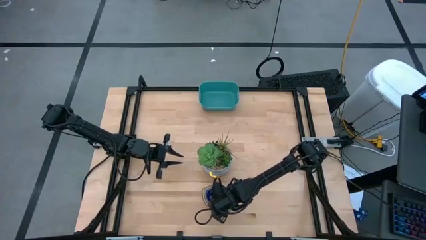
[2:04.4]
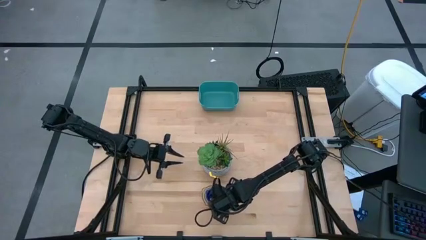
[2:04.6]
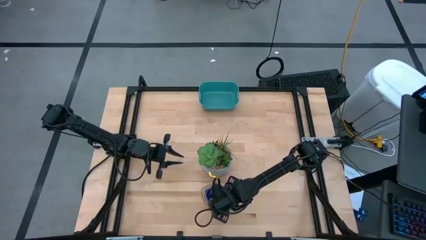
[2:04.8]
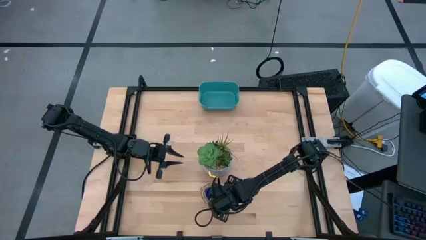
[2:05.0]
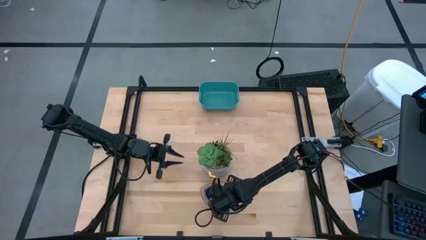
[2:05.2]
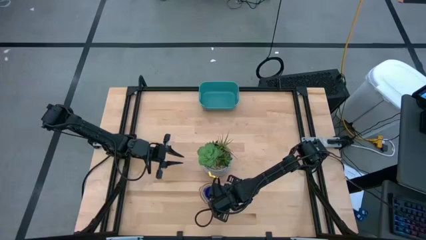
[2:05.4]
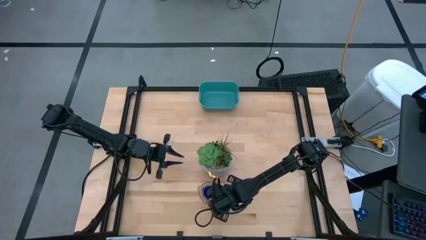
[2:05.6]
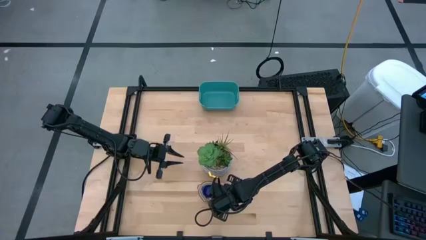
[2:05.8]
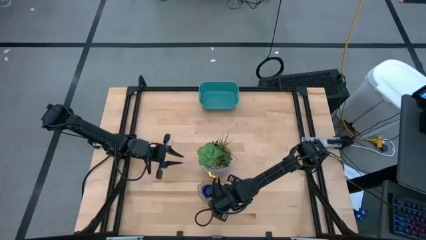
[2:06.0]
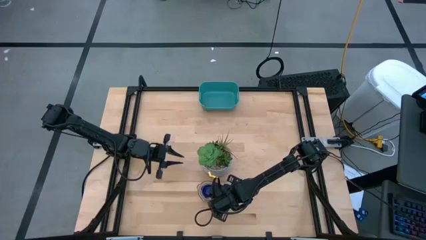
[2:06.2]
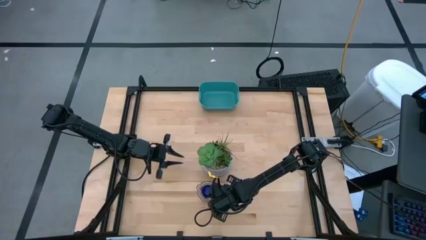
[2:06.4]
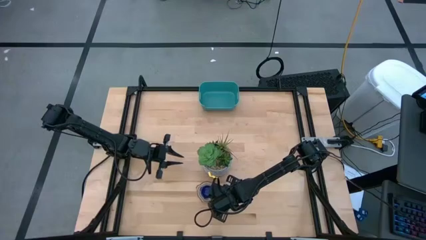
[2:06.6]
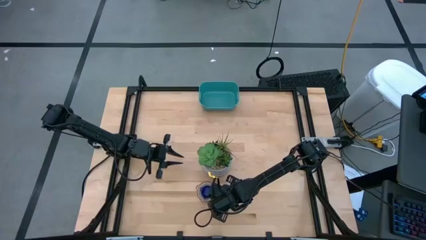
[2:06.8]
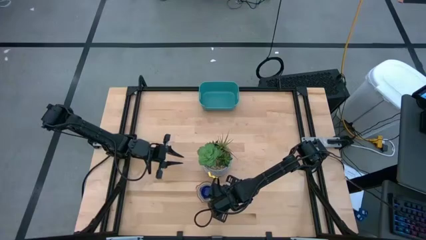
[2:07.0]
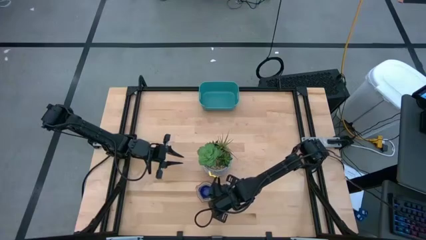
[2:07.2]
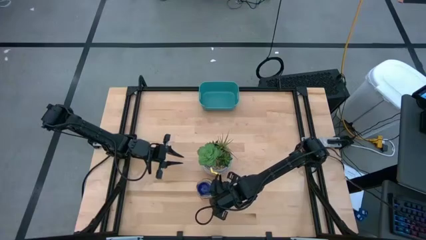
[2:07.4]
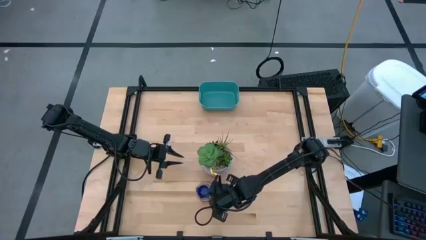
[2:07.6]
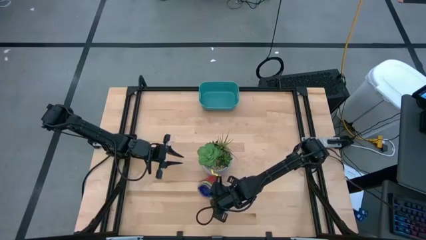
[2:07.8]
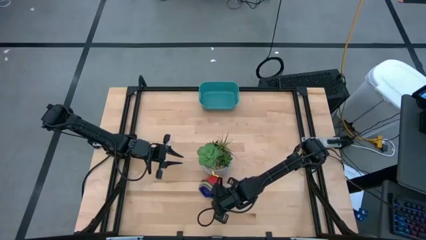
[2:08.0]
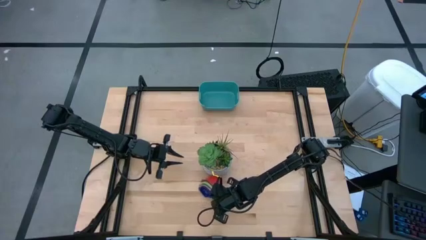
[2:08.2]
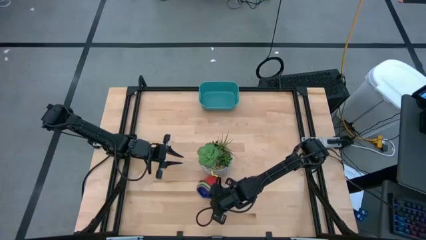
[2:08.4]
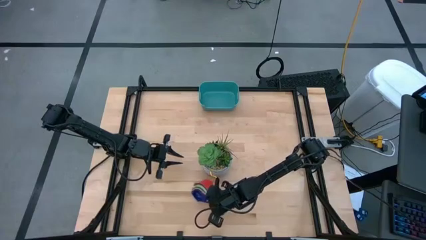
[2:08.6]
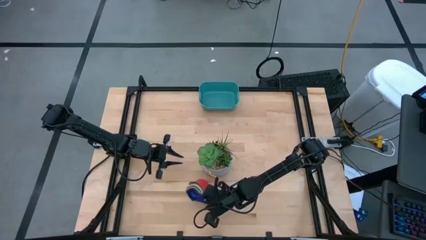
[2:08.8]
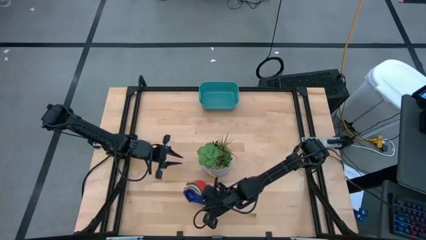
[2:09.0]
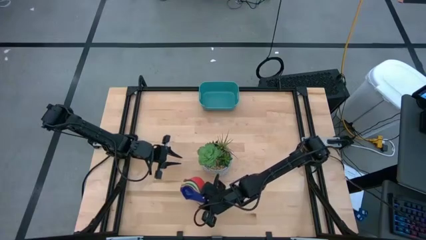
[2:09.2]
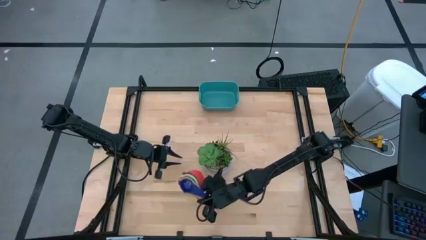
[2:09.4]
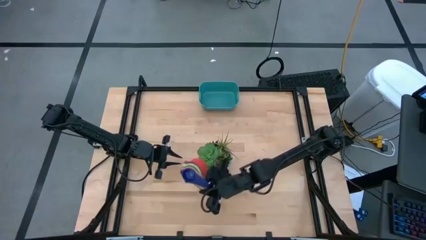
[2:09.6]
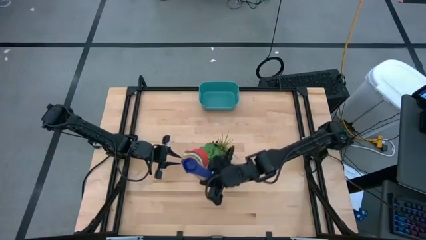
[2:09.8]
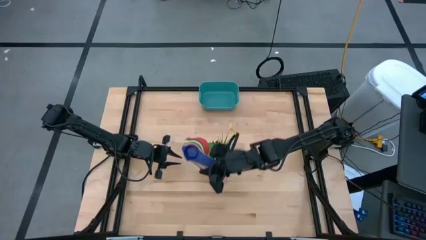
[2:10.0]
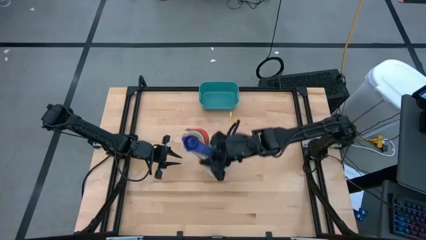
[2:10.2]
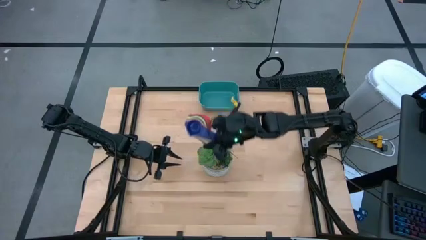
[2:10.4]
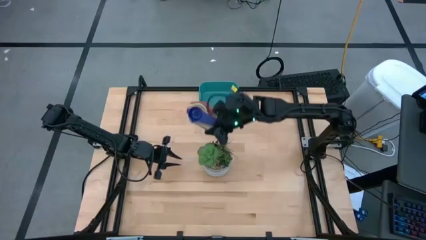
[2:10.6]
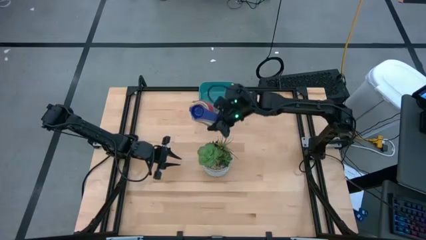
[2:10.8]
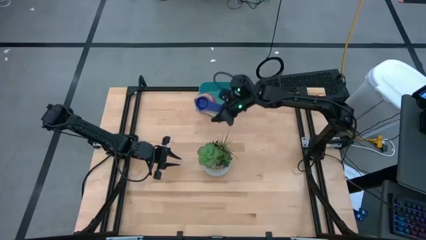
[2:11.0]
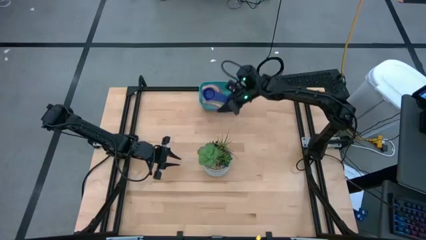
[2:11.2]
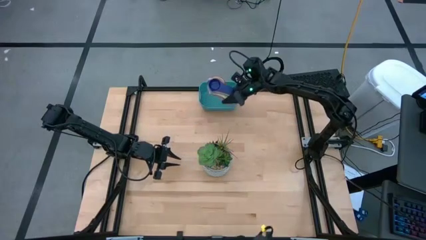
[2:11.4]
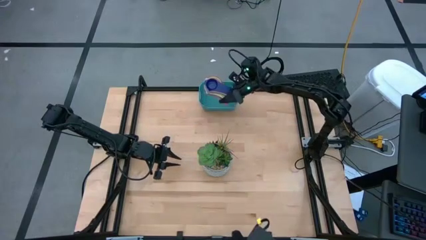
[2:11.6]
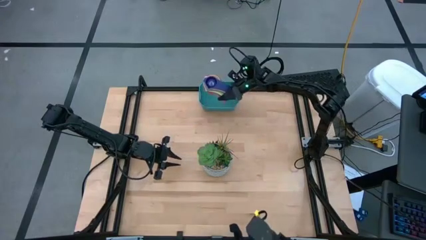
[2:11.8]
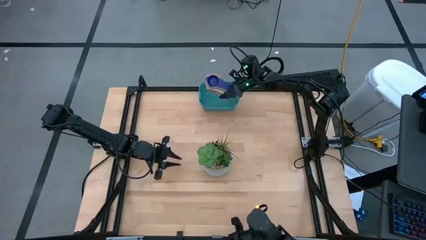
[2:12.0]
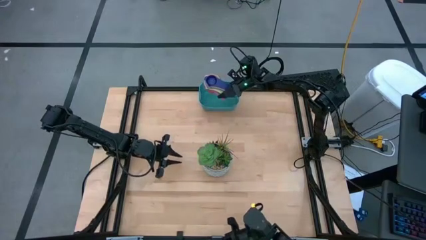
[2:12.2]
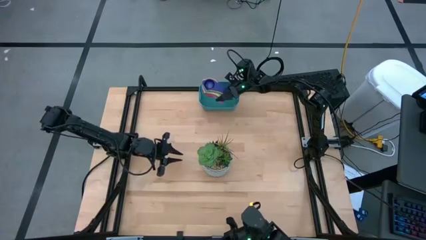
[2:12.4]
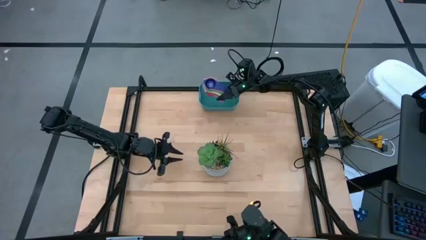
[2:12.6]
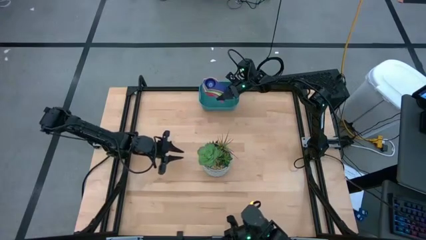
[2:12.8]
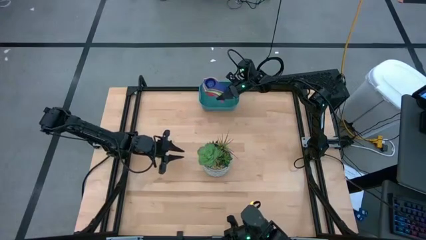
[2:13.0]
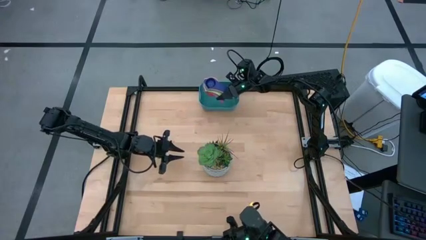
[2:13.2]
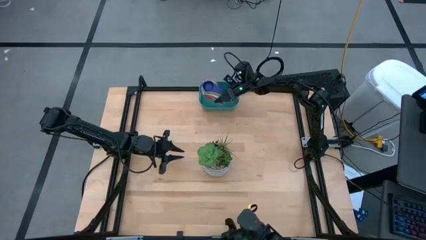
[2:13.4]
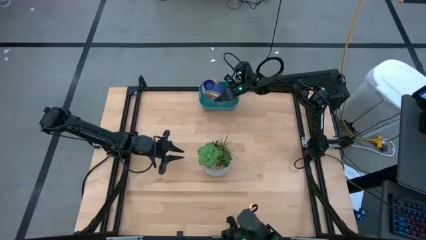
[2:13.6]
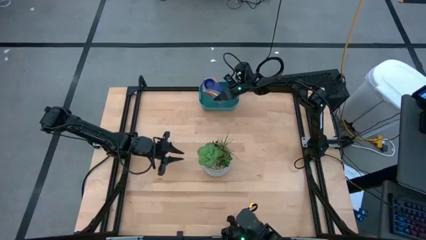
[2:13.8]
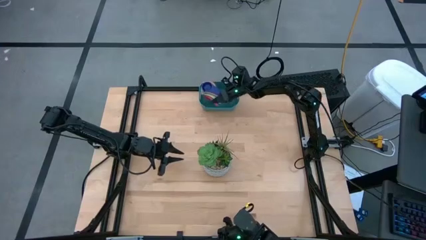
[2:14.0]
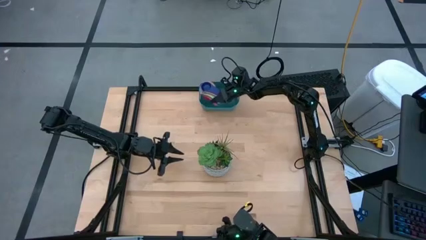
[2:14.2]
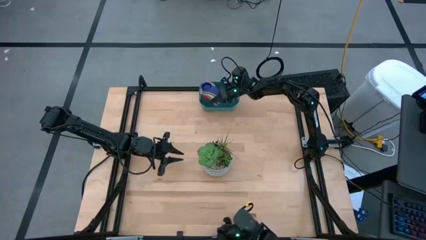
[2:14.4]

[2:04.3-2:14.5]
Task: Nest measuring cups in basket
Put the nested measuring cup into the green bin

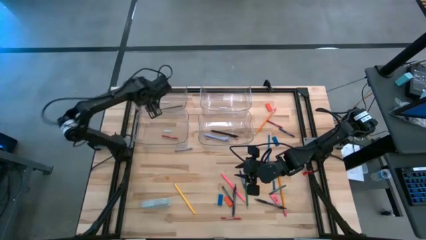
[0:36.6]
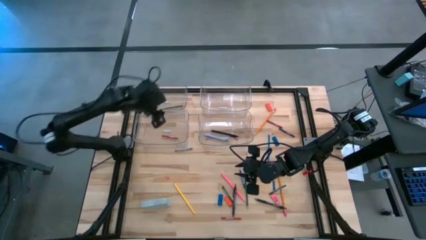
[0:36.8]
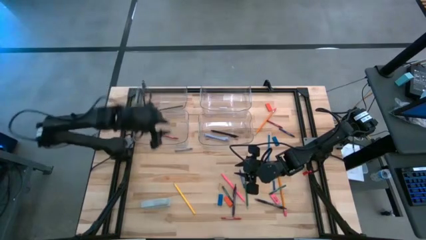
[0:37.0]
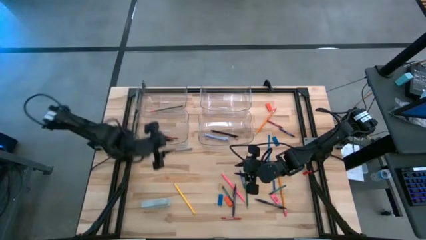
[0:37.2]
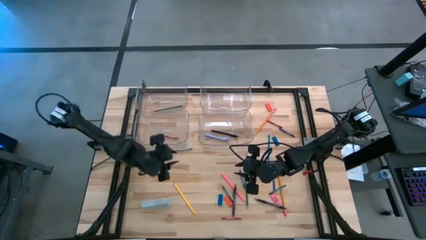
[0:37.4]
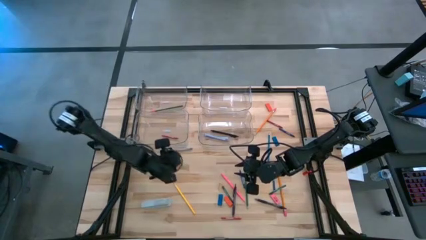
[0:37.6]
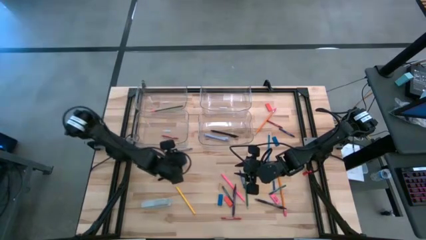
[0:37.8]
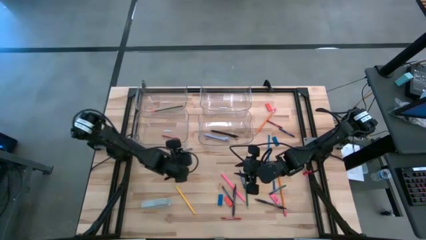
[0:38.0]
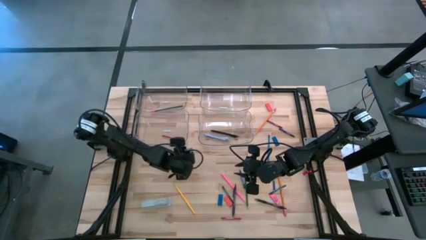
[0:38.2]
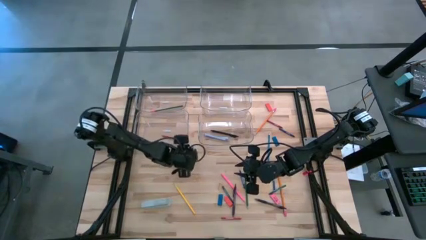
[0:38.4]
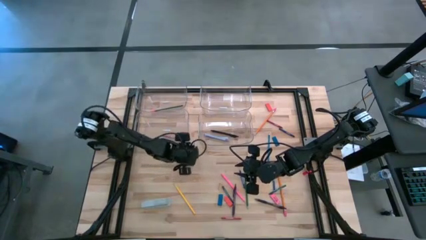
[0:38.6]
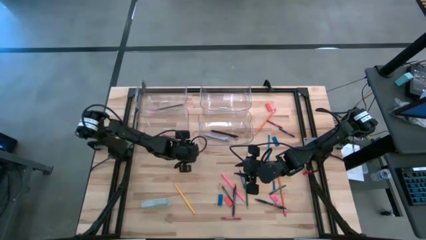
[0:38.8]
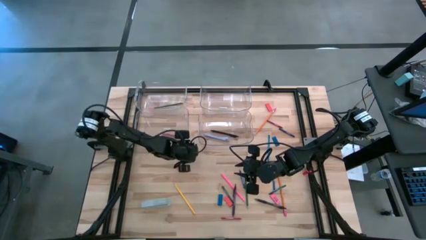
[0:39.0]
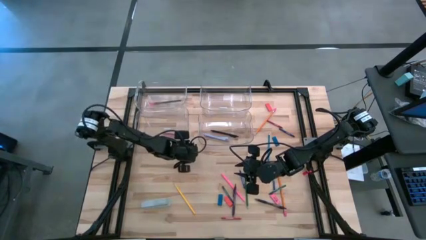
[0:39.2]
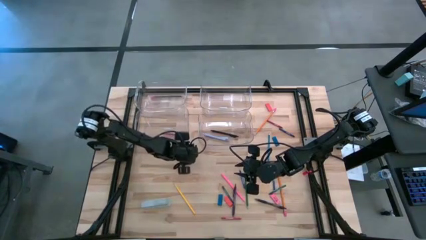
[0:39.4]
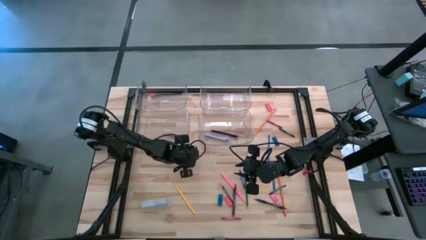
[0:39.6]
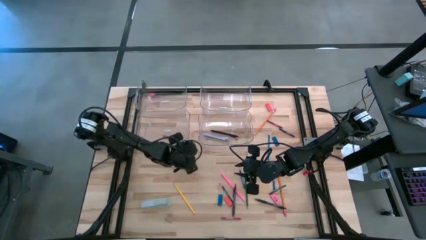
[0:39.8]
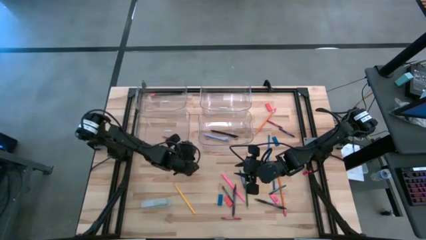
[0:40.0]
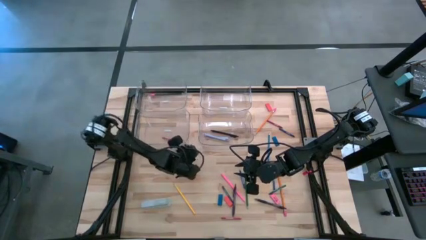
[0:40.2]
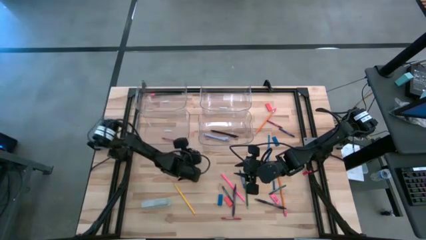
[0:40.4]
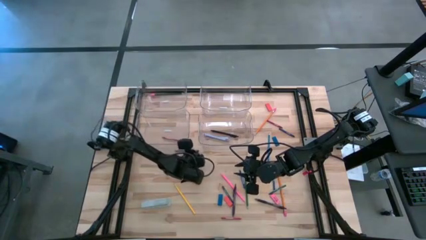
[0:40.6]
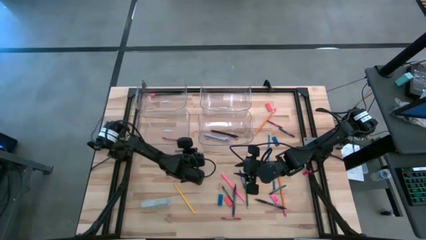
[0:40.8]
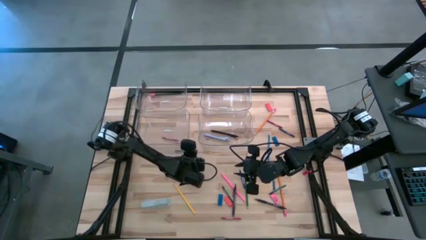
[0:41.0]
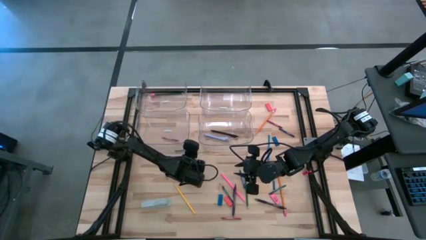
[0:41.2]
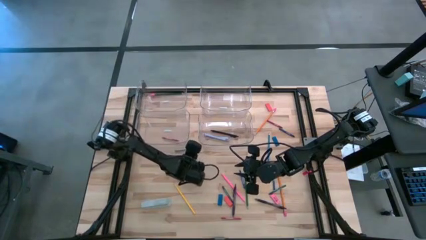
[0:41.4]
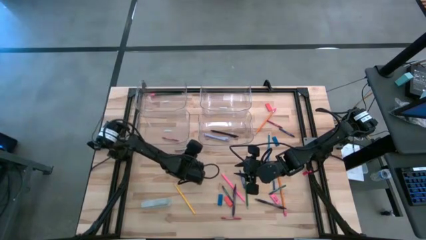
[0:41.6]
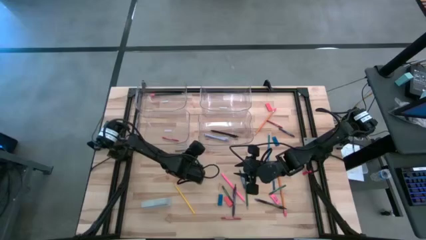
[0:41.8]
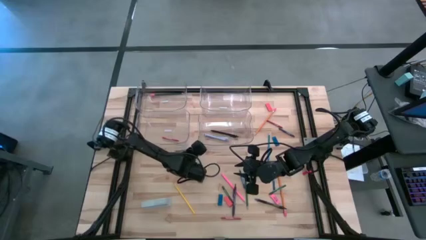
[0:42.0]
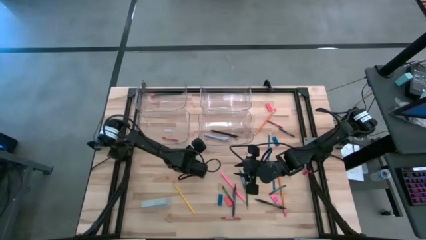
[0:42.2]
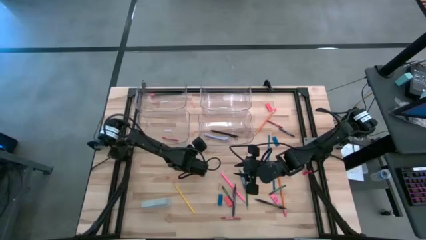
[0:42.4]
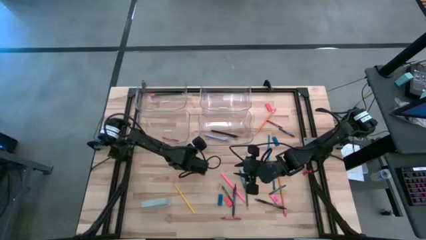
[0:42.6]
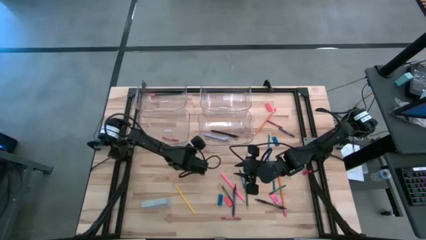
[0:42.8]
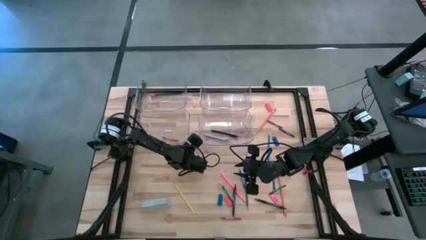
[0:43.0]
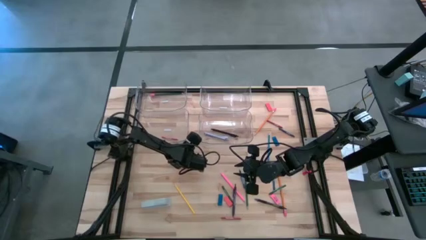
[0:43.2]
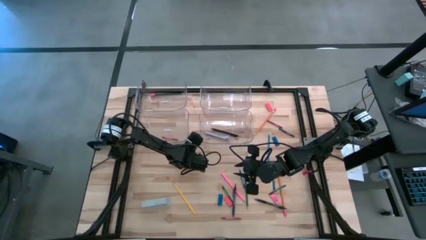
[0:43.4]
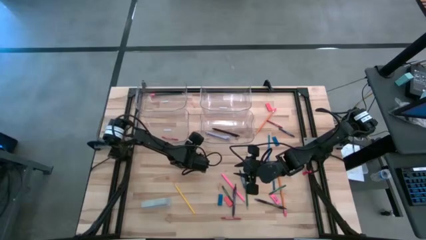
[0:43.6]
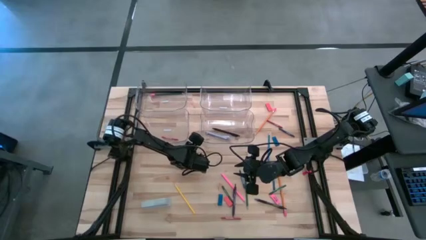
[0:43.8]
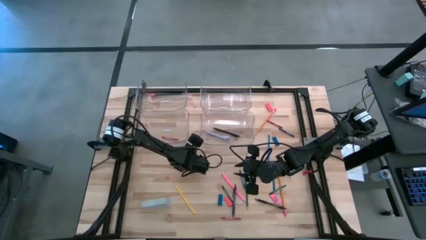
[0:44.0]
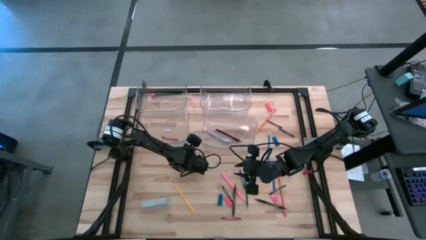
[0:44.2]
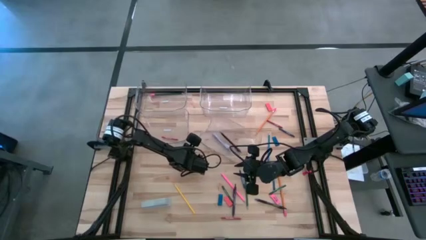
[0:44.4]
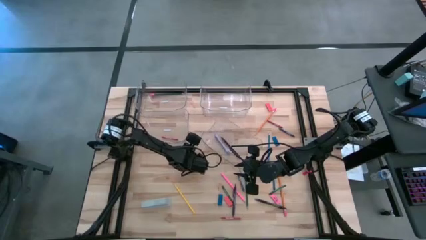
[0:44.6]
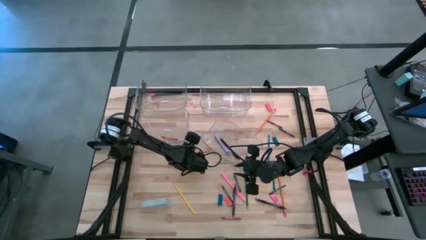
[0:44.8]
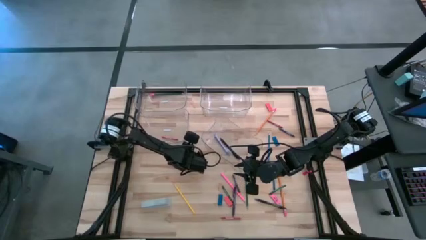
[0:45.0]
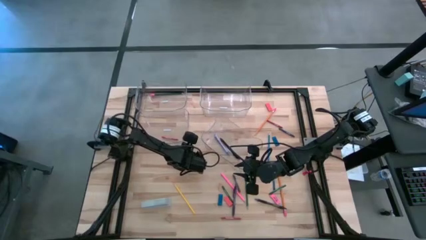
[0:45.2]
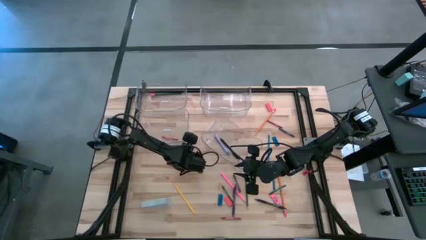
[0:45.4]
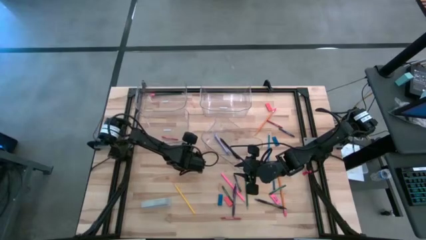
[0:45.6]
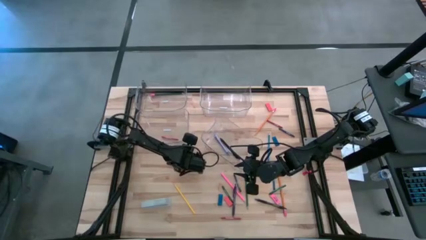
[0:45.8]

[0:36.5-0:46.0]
Task: Sort crayons/erasers/pens/pencils in bins
Move the left gray crayon to the bottom left
